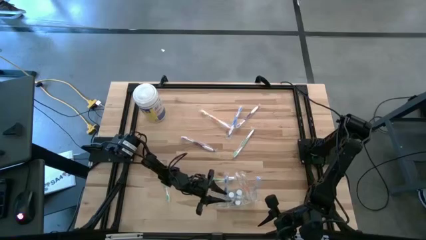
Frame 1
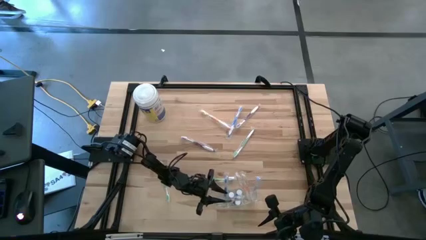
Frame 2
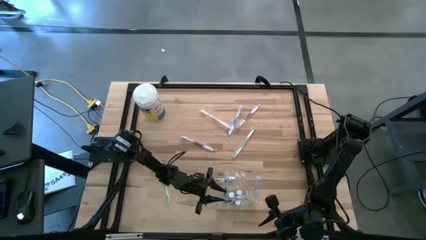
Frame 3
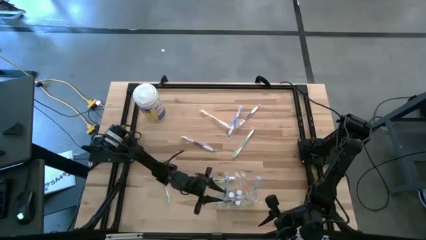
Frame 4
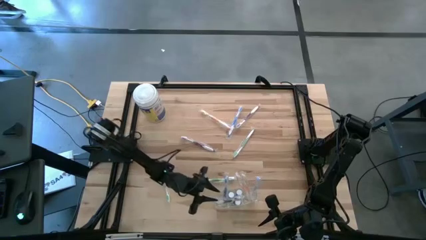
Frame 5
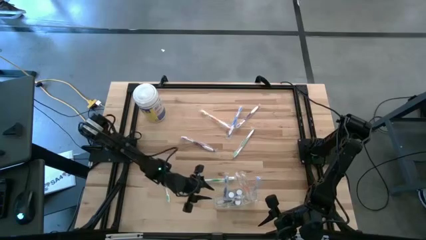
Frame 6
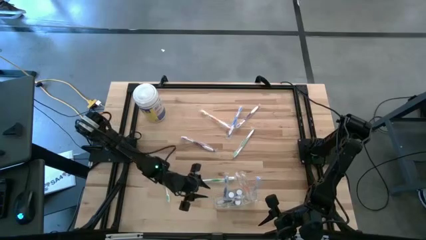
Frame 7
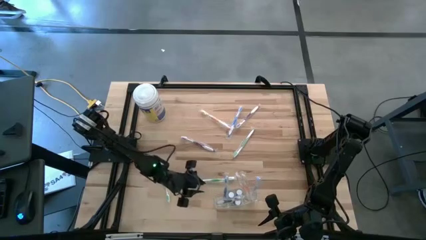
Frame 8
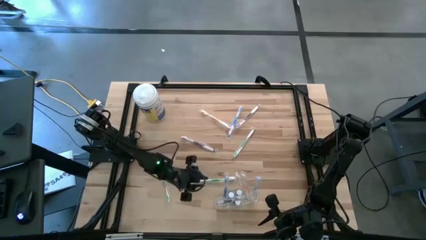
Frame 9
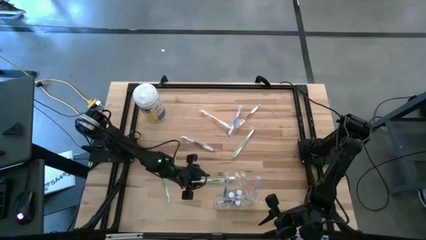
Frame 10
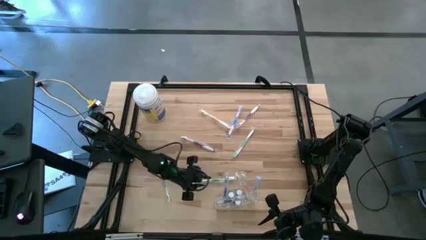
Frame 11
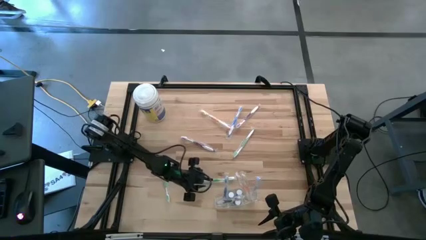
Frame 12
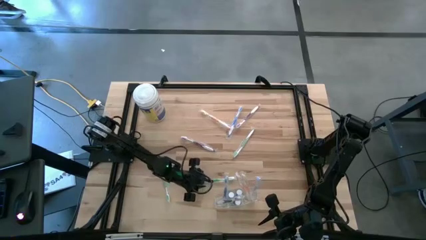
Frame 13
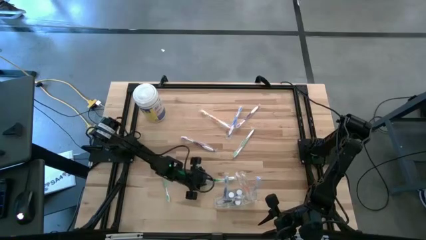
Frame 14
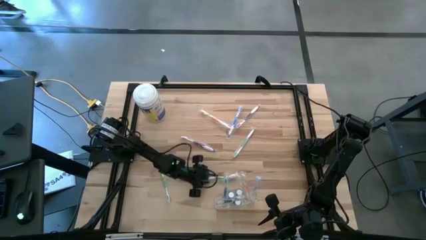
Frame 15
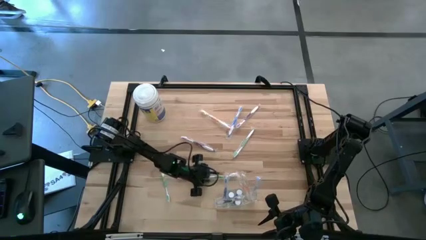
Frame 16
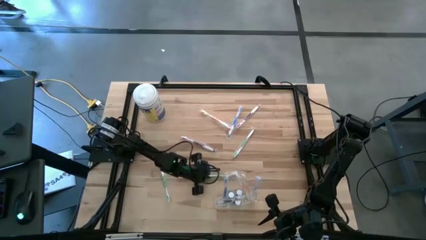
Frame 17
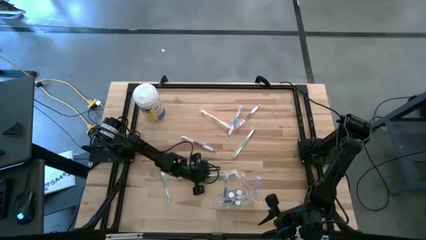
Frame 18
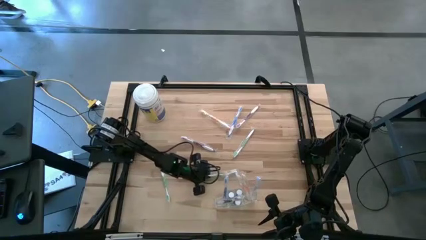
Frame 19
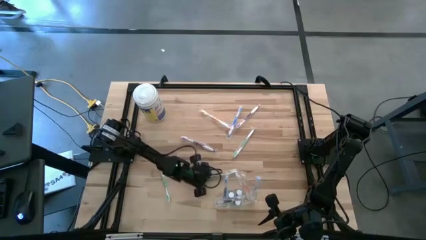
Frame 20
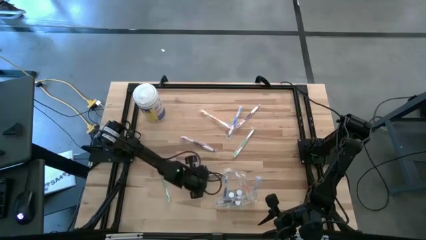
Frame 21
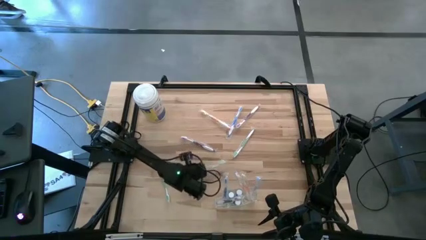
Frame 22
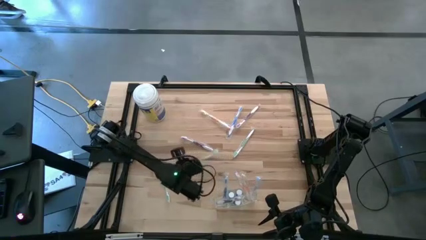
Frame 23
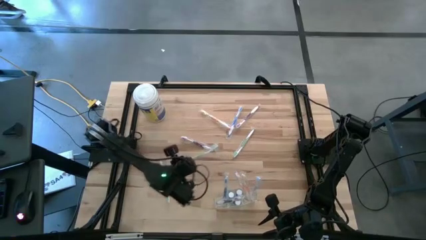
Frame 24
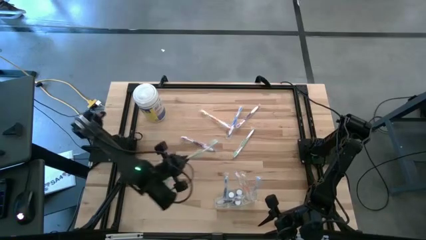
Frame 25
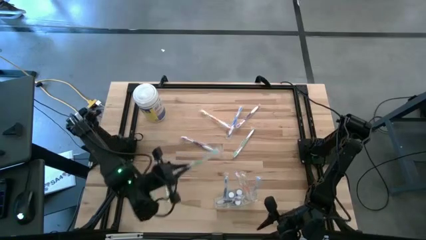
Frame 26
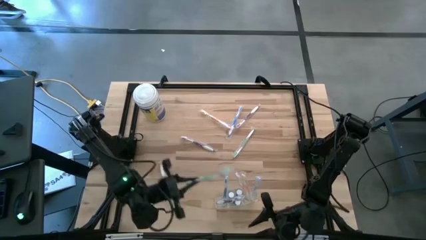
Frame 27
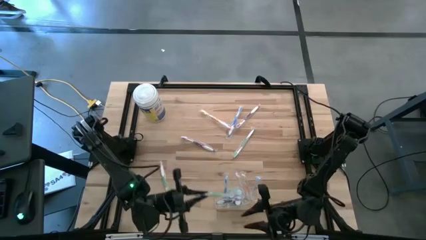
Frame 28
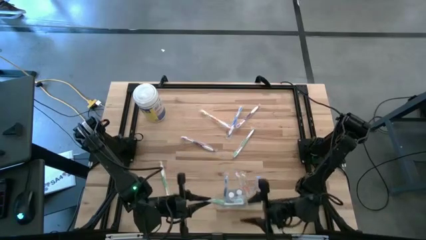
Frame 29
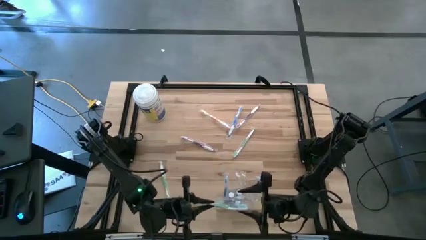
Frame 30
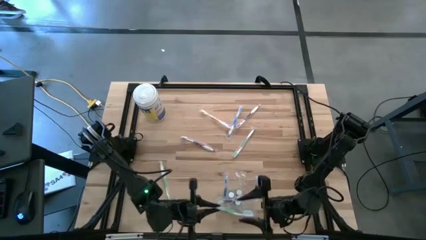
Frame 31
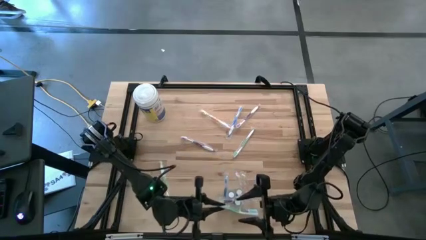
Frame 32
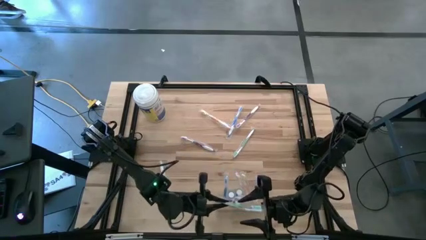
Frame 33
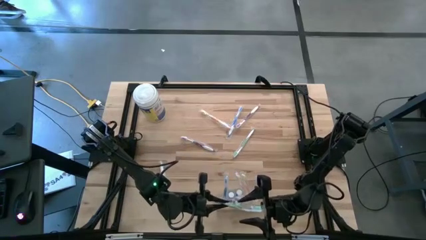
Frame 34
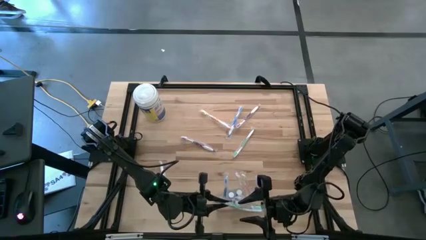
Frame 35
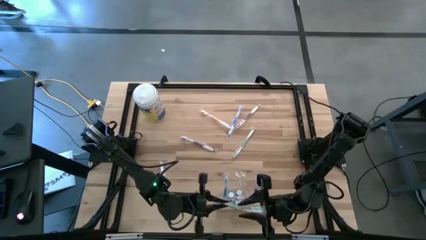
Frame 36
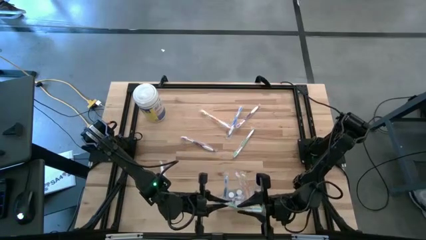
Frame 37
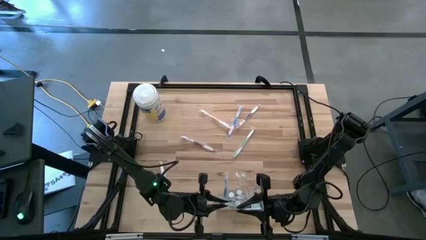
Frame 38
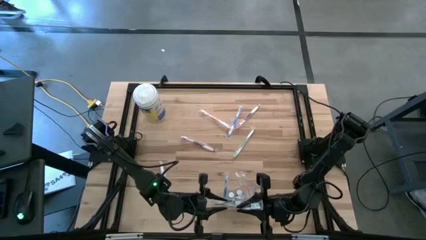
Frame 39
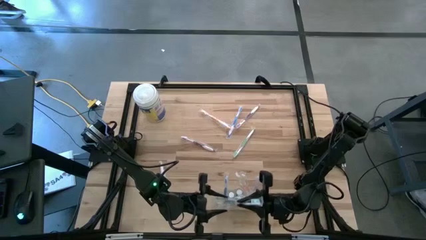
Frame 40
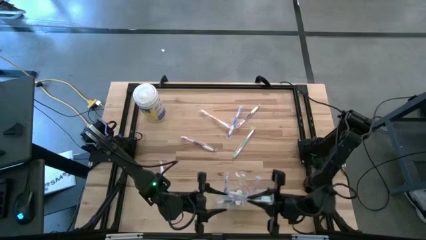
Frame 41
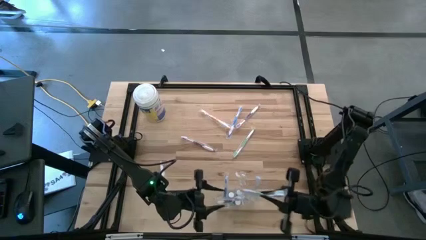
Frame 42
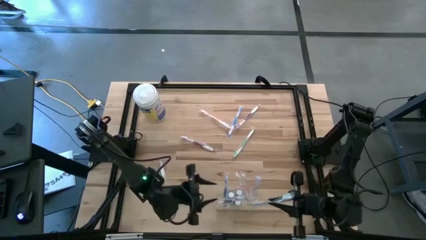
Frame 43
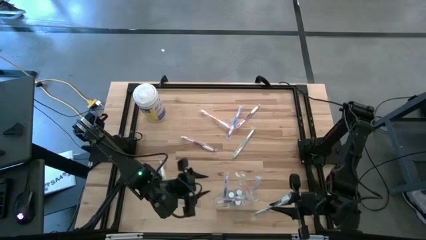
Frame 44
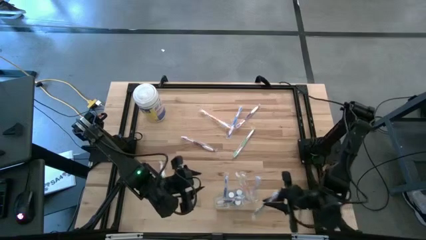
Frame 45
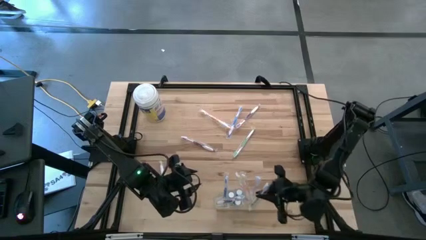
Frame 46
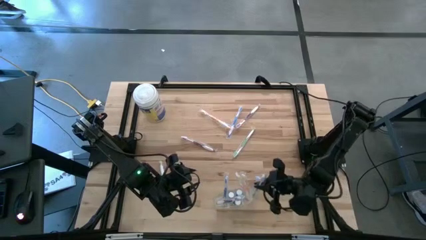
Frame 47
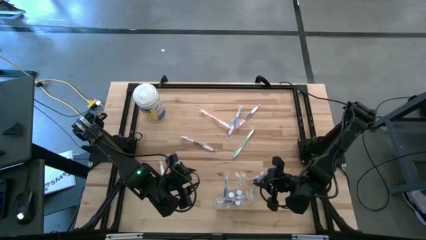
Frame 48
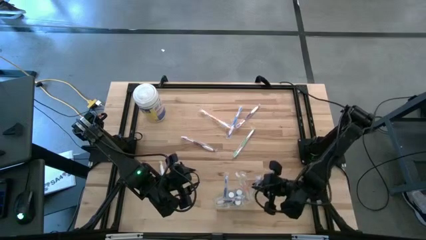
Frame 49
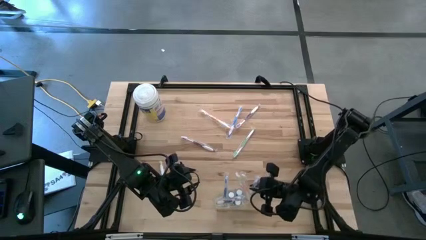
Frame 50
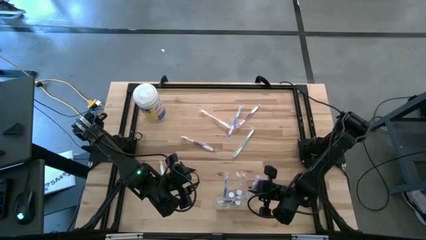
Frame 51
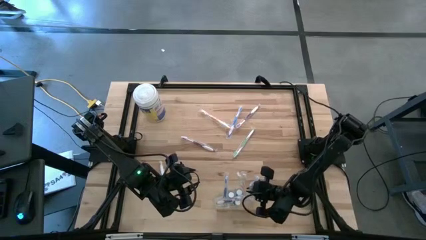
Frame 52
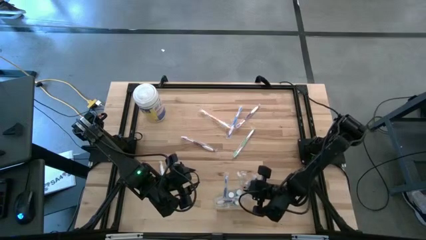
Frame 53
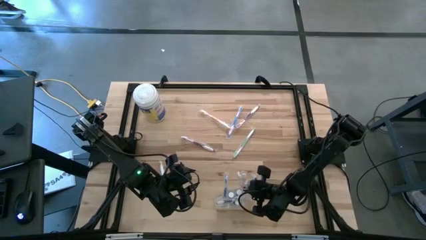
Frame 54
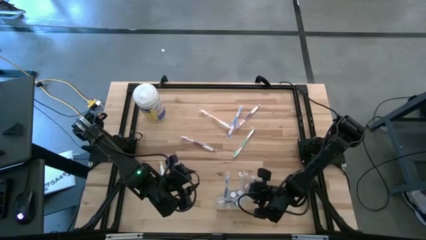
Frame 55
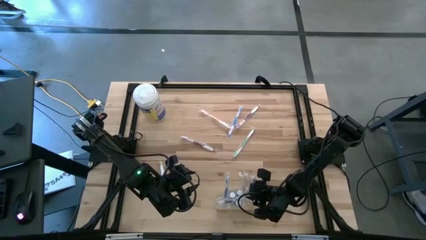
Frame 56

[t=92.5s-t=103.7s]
Task: Pick & Place toothbrushing station
Put the middle green toothbrush into the transparent bin
